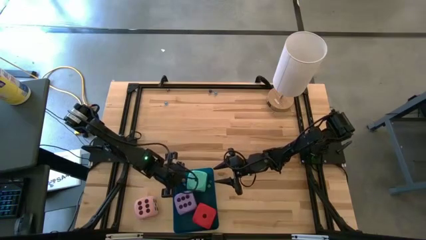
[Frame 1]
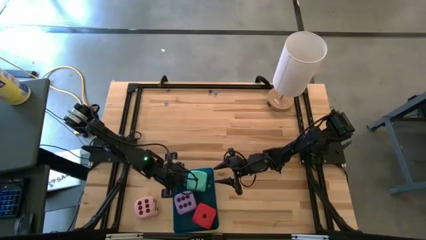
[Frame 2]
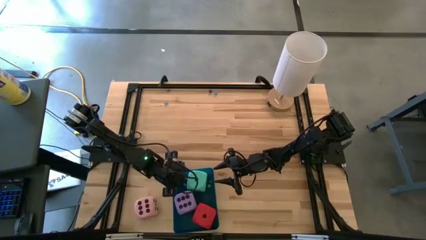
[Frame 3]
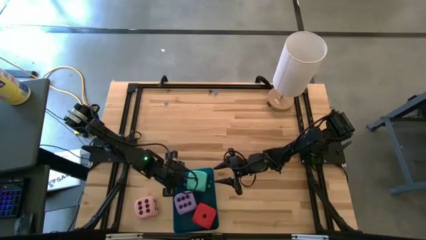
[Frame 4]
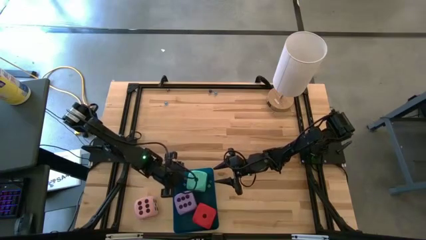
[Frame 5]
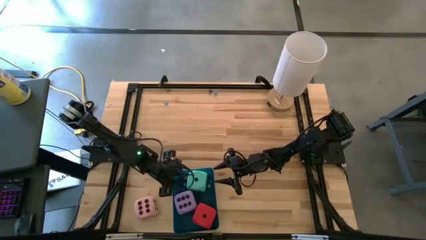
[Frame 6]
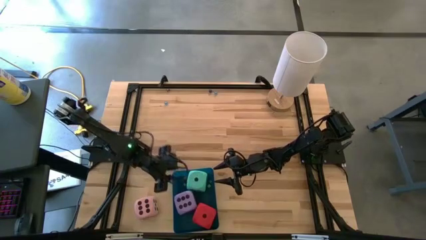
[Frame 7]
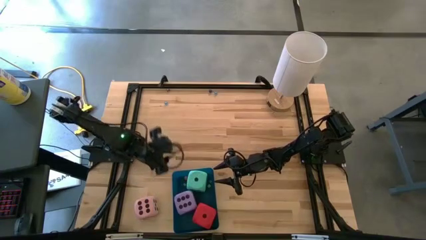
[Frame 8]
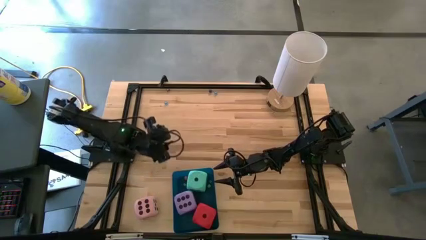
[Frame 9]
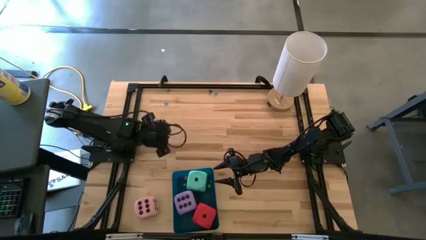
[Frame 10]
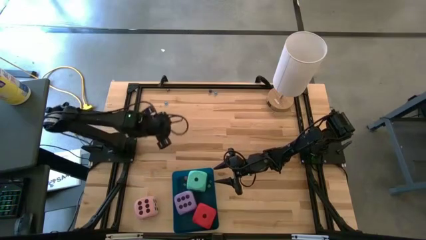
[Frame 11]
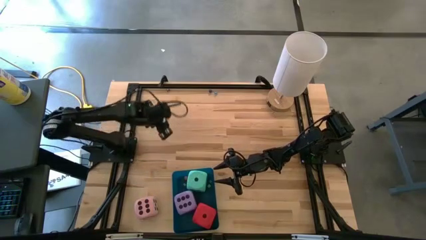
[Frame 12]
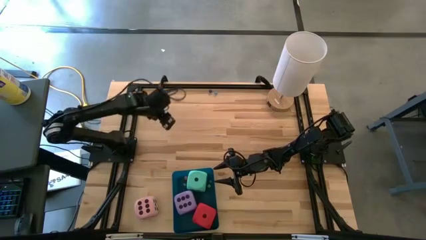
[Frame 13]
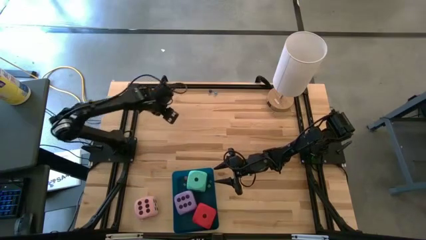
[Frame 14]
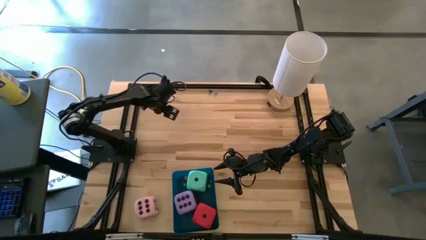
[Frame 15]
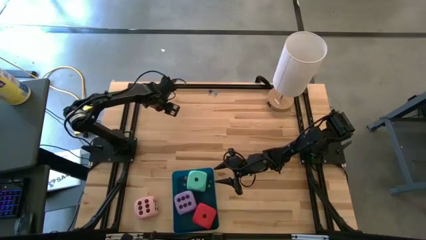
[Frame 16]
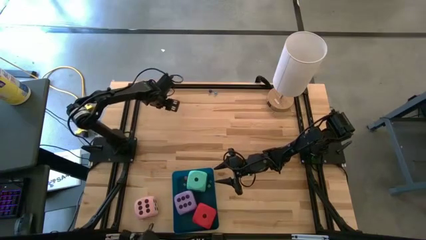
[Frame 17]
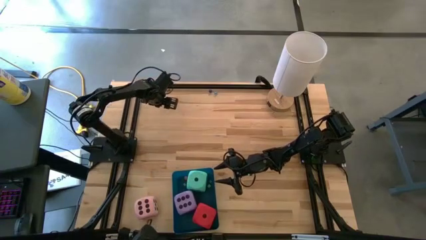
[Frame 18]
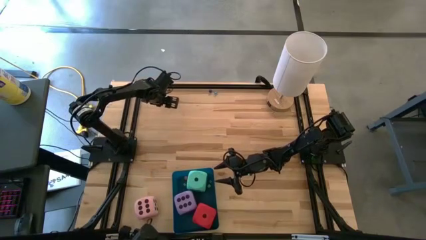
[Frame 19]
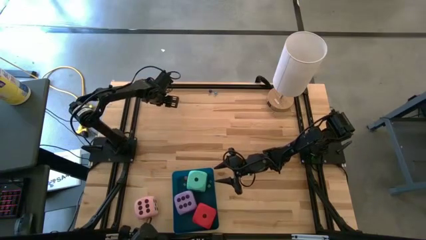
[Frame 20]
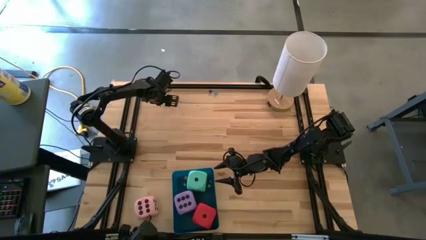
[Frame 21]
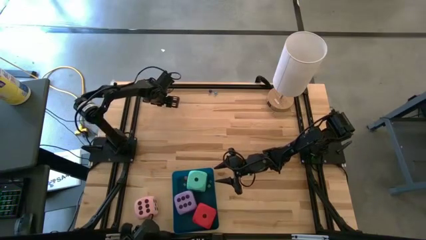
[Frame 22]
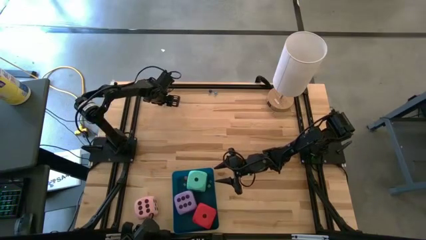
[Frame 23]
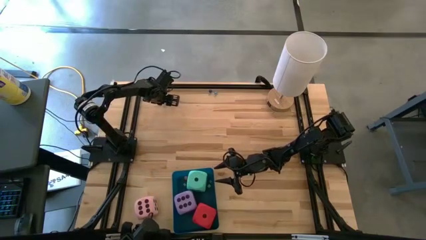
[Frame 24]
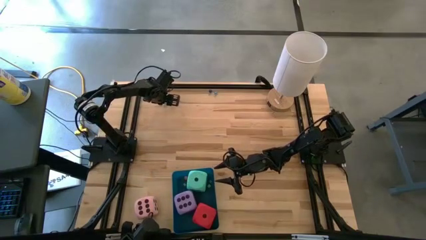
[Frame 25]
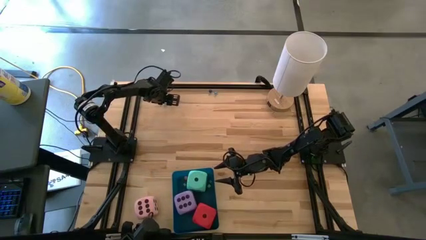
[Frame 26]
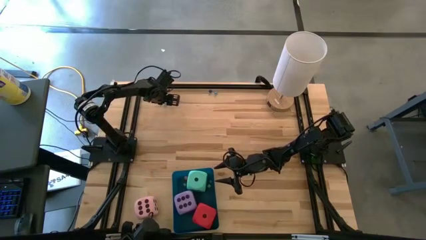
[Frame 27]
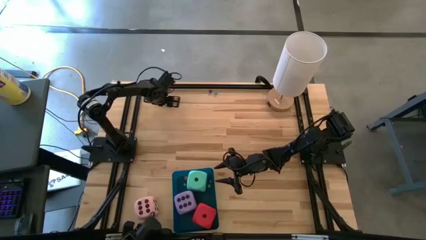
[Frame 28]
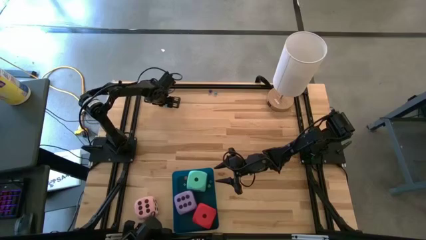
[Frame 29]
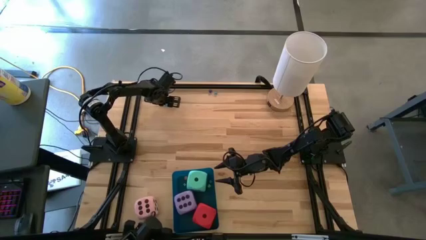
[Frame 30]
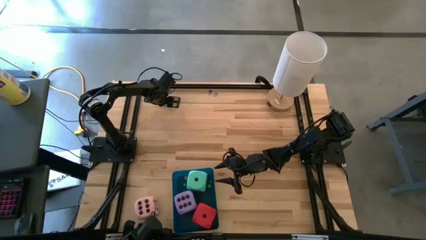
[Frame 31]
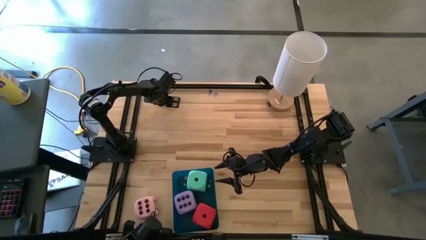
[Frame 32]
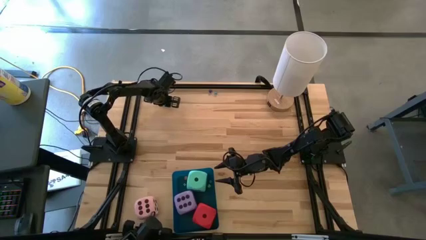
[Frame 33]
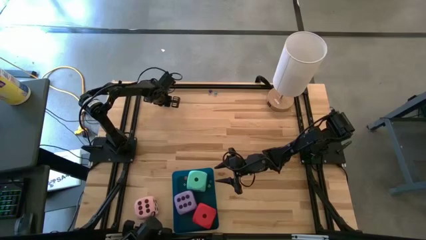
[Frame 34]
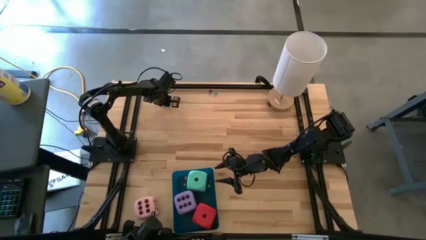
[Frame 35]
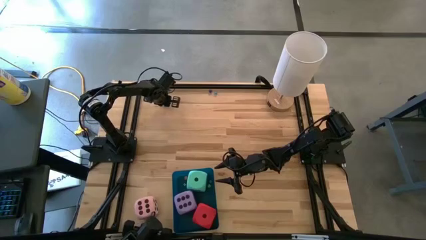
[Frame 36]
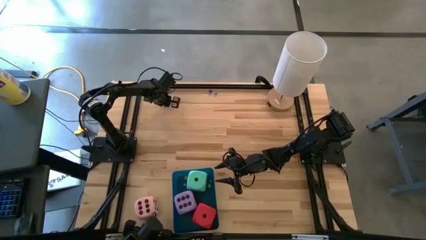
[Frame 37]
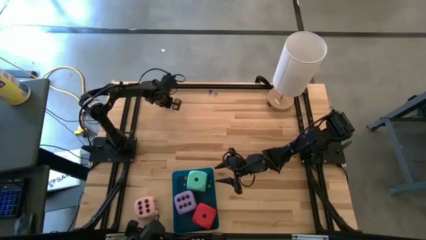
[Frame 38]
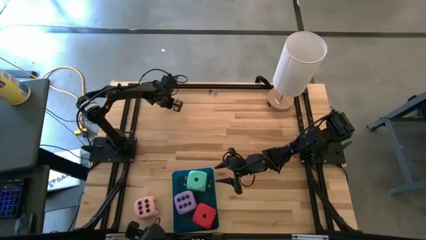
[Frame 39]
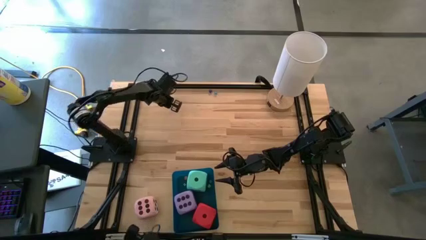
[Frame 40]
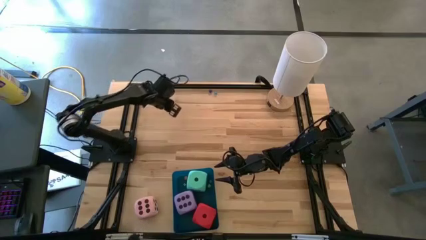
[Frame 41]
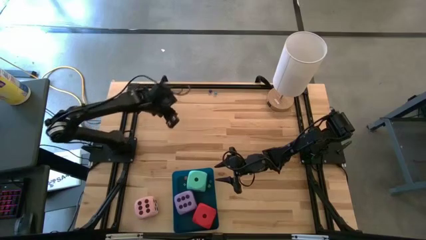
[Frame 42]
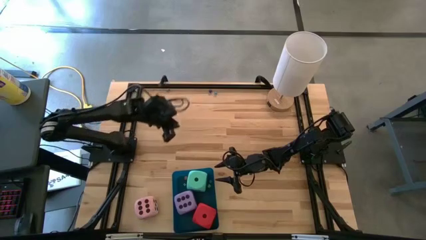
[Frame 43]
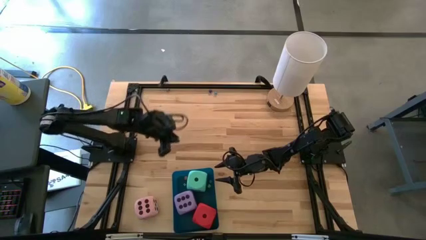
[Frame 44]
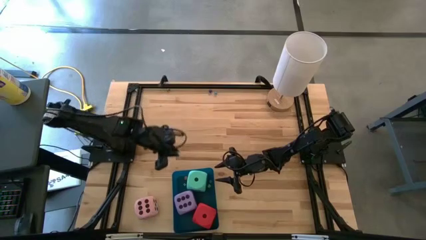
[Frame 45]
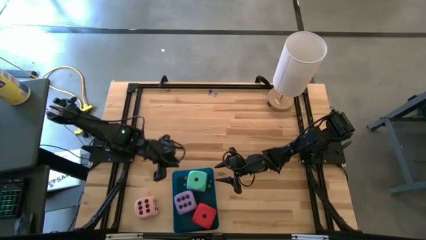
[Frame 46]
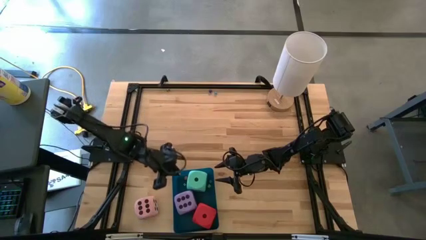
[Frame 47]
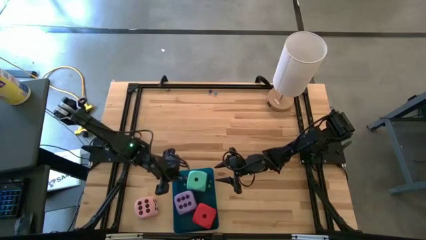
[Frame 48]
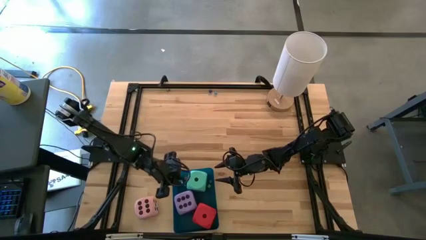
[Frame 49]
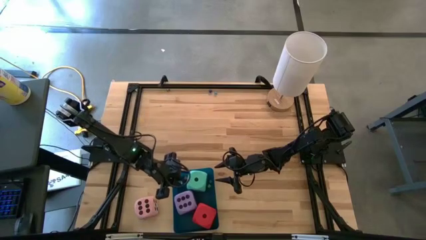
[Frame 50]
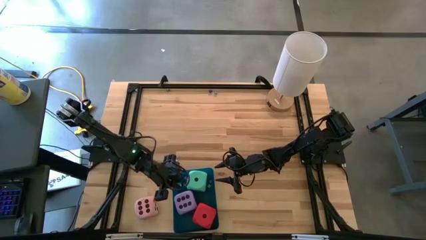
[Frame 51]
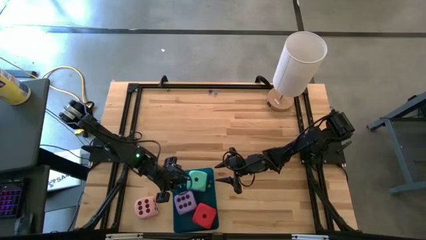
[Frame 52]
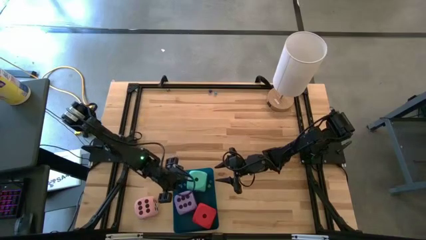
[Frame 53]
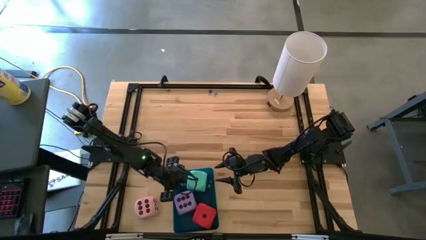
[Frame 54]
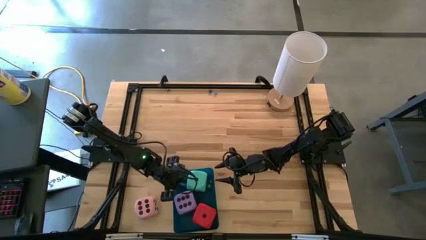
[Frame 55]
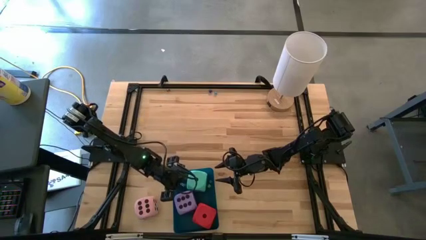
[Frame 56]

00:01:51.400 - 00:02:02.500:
Task: Pick & Place Dice
Put the small light blue die into the blue bin
